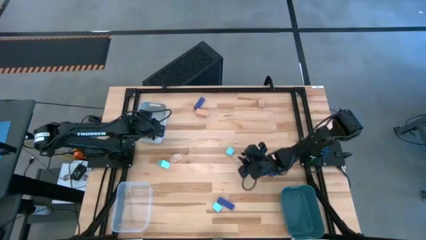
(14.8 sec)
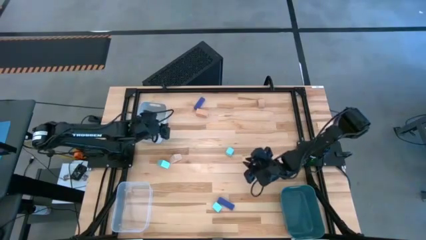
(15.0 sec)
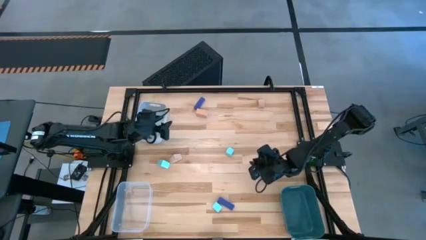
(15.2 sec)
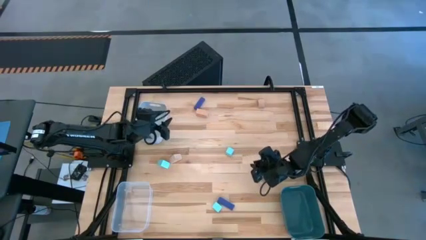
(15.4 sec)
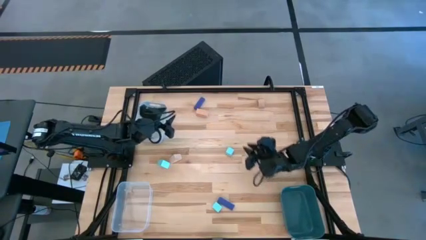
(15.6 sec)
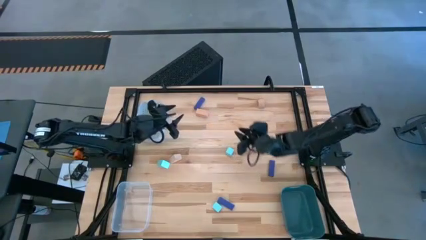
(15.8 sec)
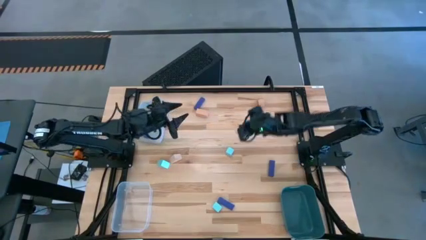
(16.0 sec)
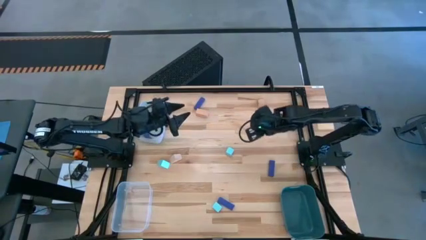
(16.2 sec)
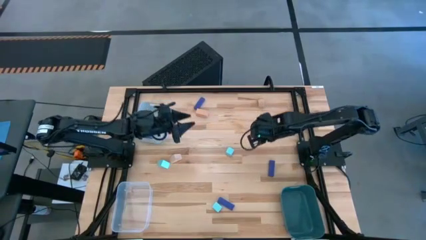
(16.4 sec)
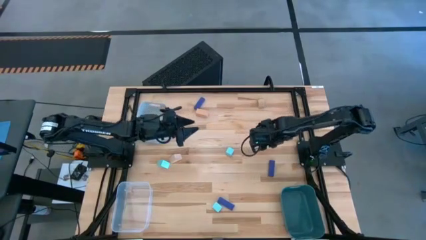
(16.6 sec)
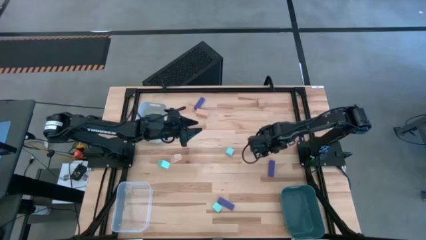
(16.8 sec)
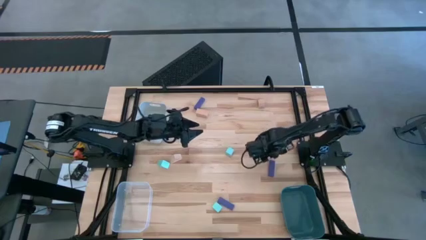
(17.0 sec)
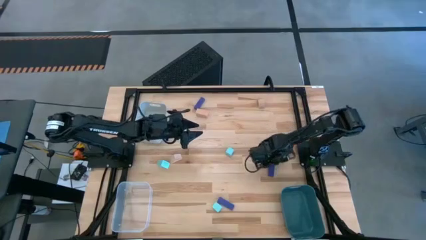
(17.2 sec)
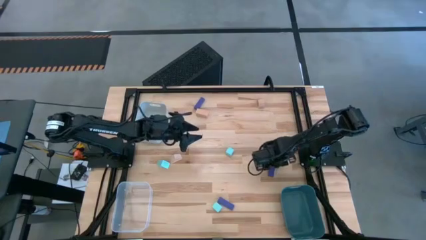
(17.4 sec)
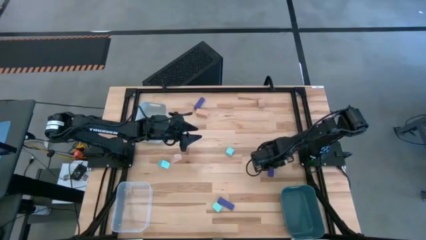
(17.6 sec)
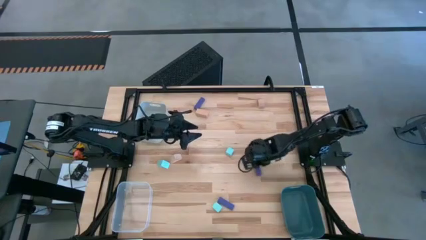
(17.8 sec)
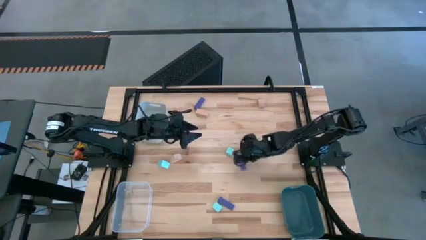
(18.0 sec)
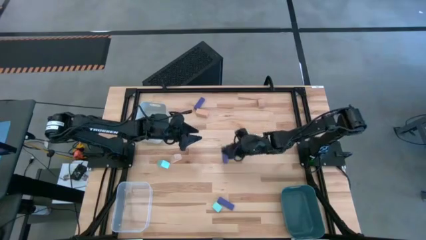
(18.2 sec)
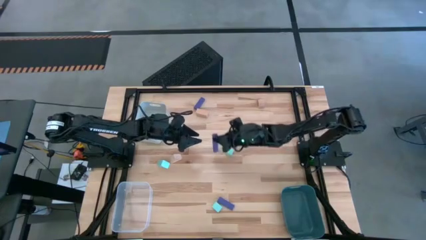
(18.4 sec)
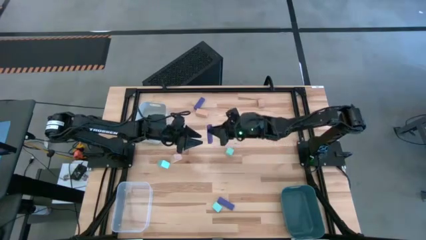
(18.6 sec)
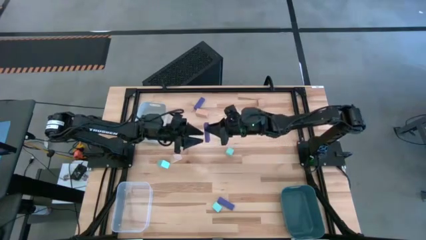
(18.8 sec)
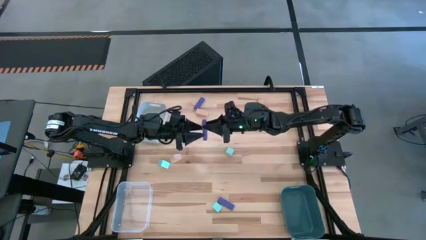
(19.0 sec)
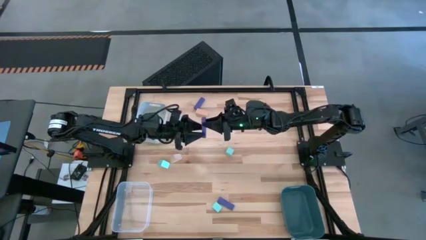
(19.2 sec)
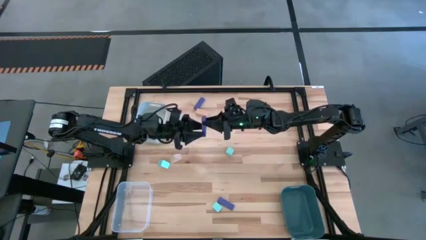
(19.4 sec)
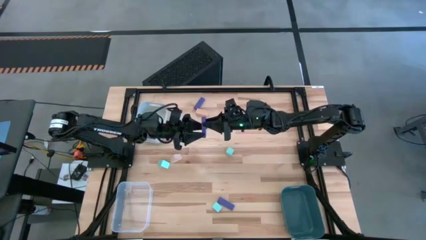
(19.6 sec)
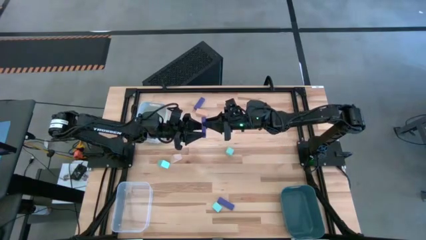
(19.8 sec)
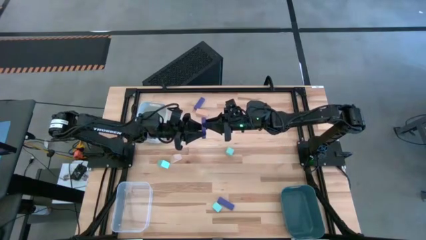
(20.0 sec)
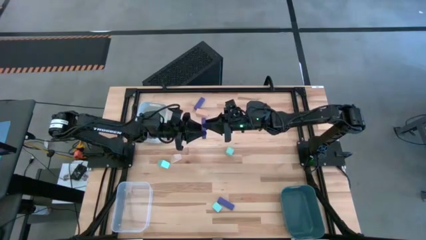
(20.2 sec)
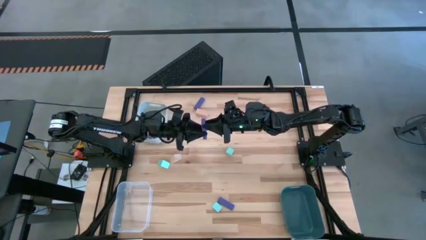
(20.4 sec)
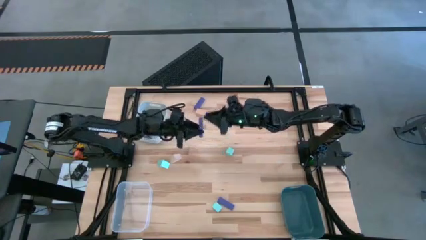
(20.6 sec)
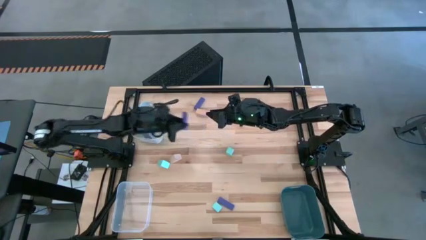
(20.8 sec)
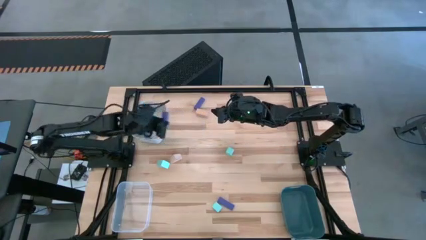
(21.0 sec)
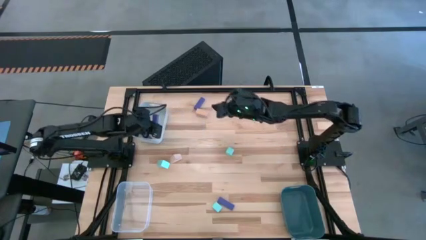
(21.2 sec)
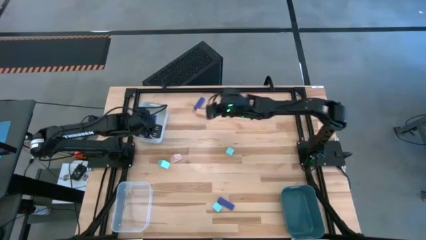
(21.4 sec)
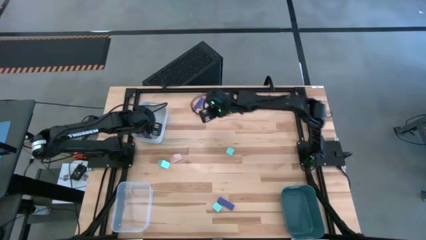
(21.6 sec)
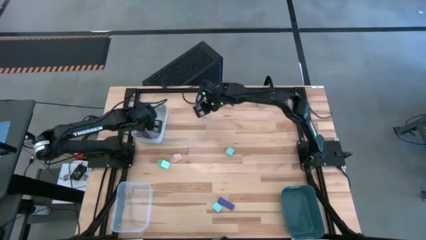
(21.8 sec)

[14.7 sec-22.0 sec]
Task: Sort & place blocks by color
Put the purple block into the gray bin

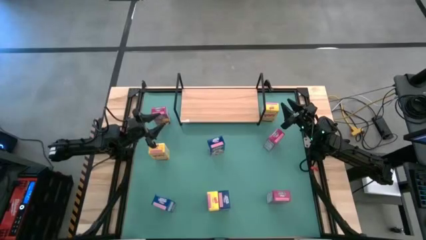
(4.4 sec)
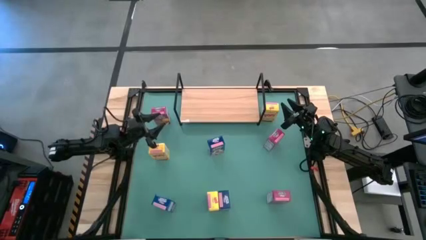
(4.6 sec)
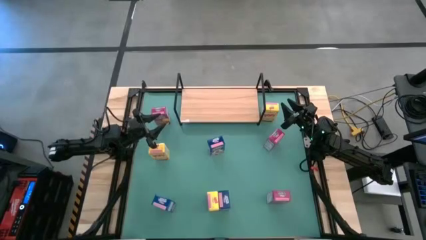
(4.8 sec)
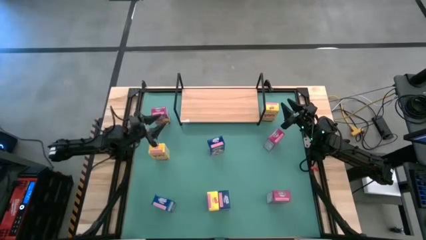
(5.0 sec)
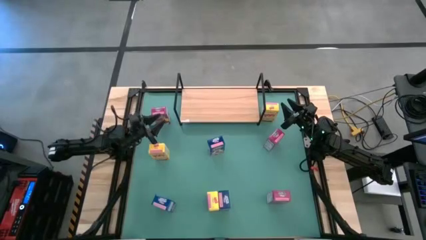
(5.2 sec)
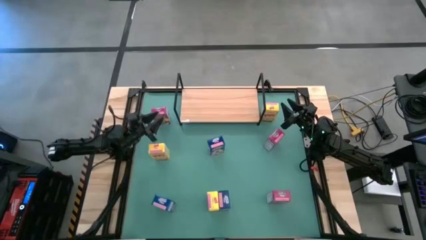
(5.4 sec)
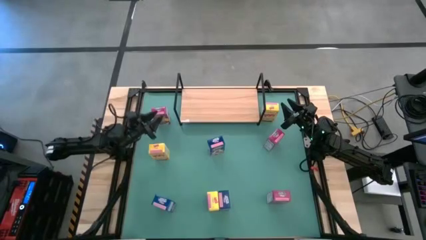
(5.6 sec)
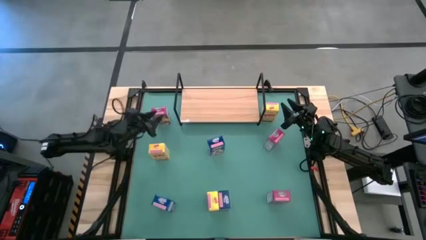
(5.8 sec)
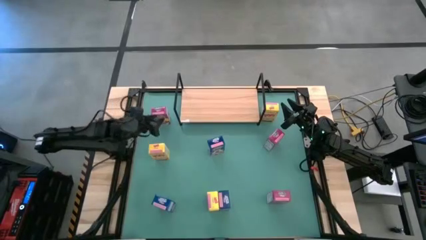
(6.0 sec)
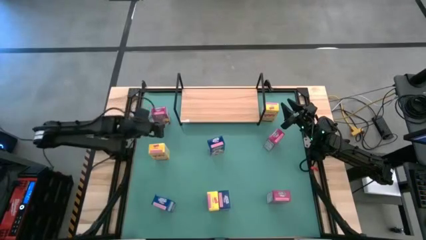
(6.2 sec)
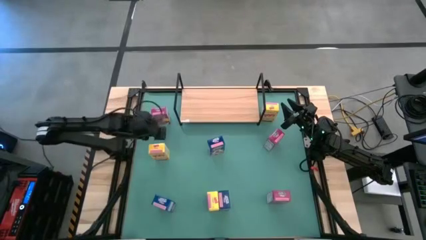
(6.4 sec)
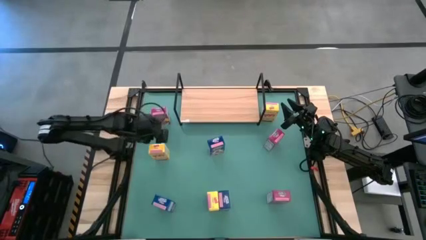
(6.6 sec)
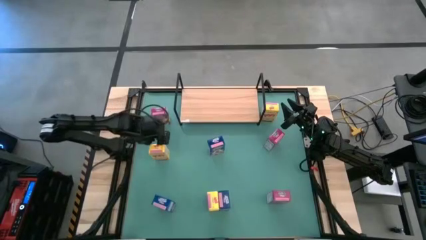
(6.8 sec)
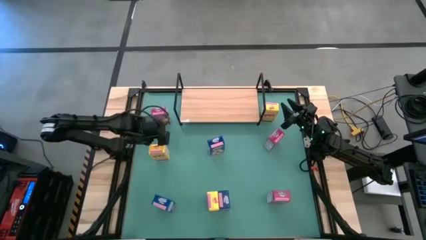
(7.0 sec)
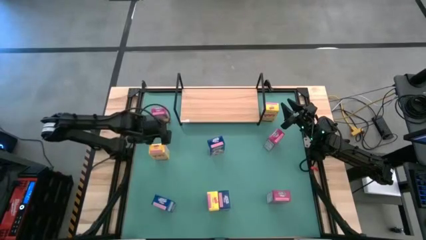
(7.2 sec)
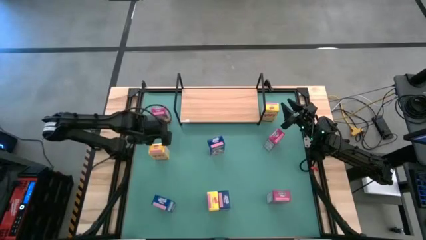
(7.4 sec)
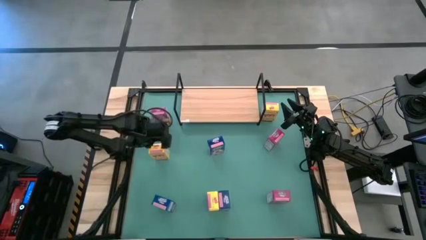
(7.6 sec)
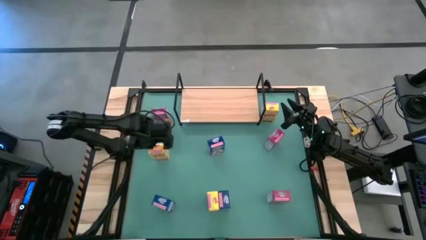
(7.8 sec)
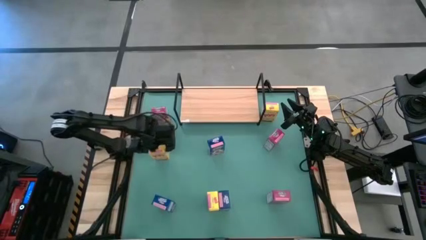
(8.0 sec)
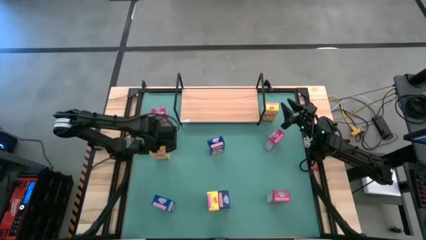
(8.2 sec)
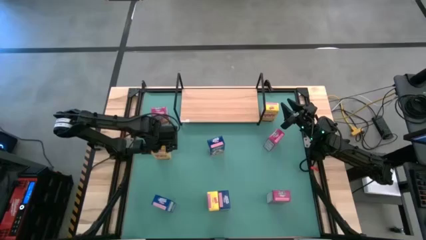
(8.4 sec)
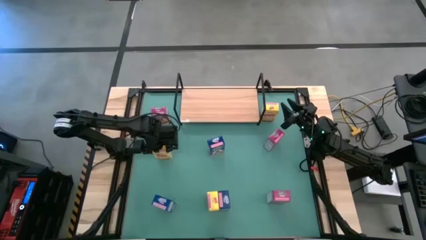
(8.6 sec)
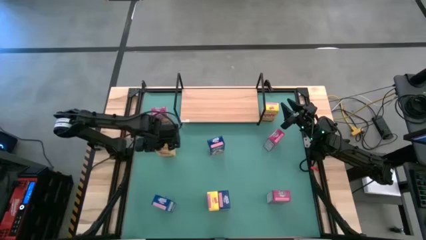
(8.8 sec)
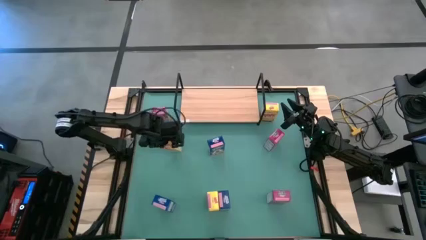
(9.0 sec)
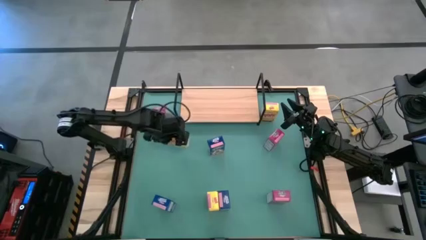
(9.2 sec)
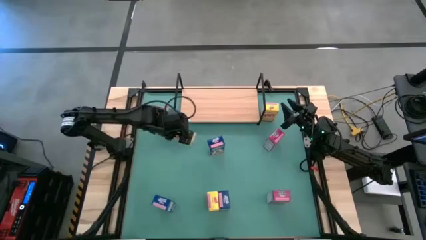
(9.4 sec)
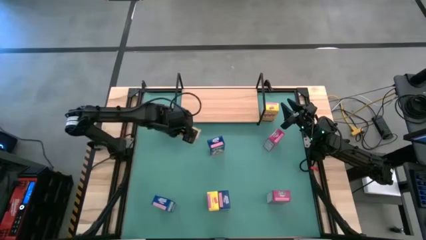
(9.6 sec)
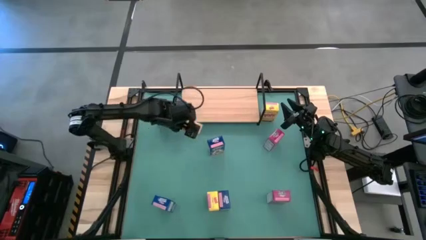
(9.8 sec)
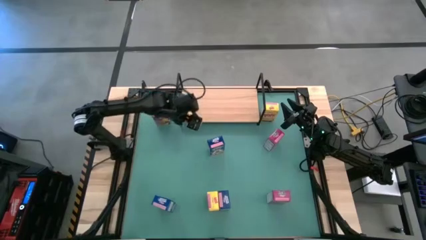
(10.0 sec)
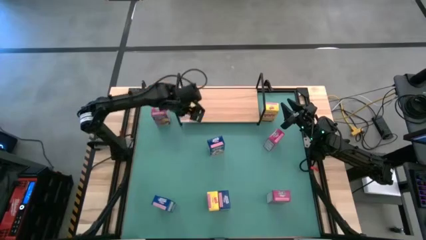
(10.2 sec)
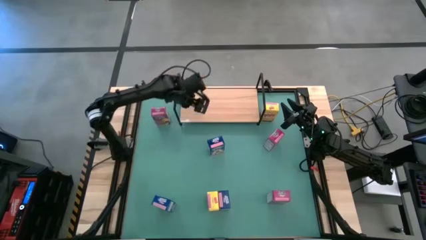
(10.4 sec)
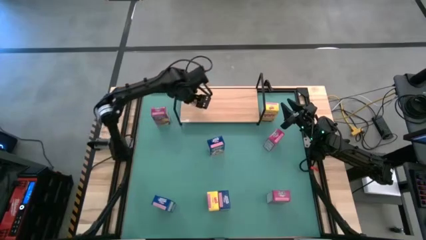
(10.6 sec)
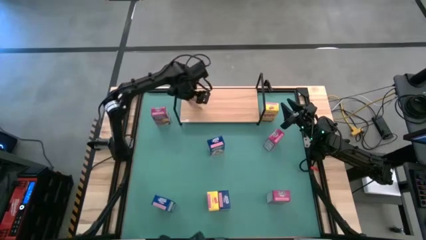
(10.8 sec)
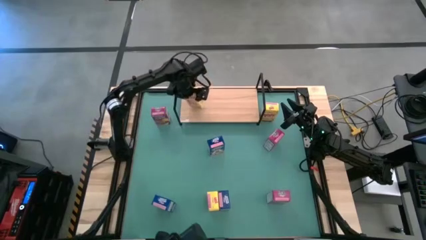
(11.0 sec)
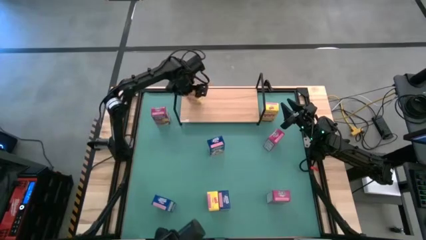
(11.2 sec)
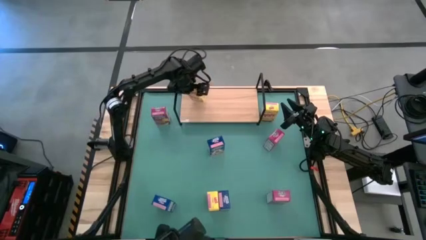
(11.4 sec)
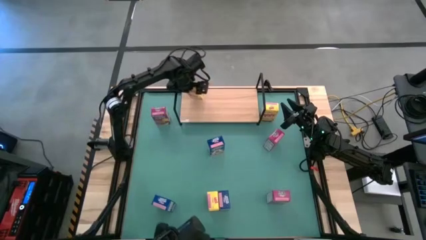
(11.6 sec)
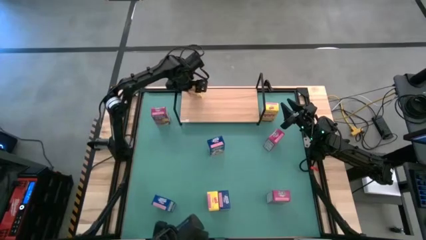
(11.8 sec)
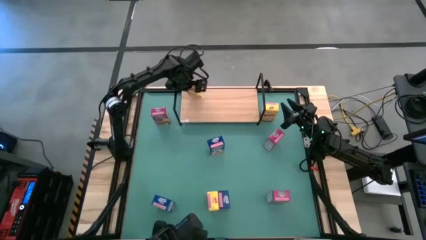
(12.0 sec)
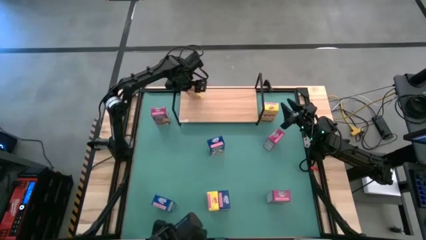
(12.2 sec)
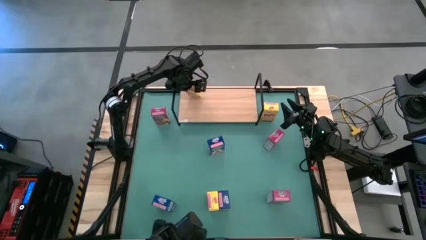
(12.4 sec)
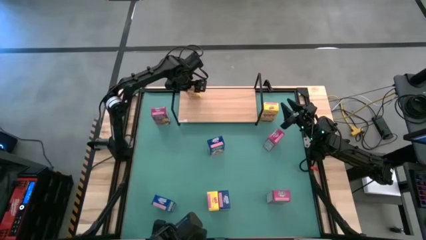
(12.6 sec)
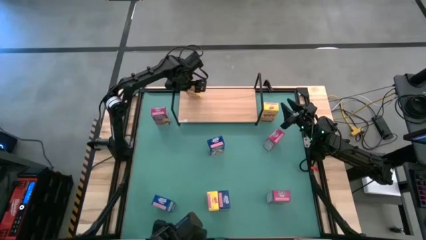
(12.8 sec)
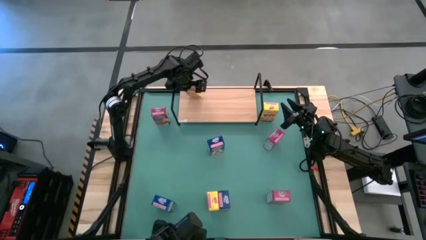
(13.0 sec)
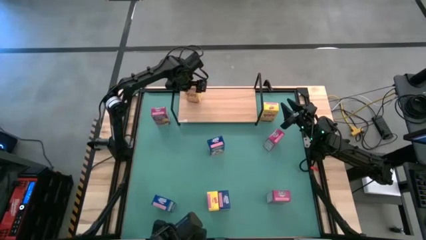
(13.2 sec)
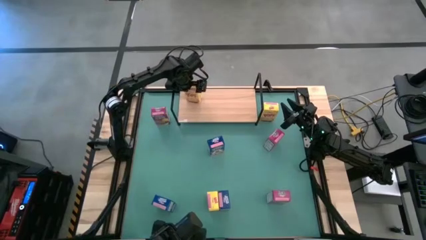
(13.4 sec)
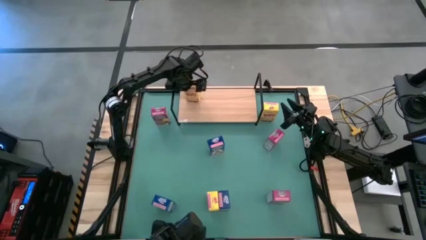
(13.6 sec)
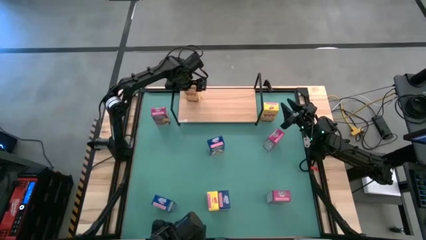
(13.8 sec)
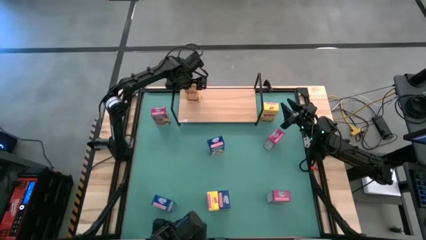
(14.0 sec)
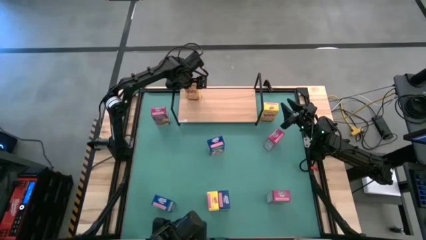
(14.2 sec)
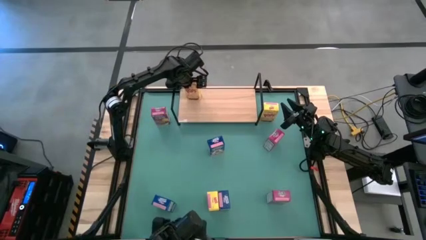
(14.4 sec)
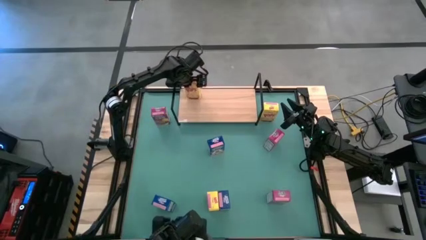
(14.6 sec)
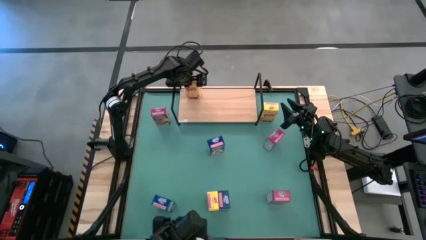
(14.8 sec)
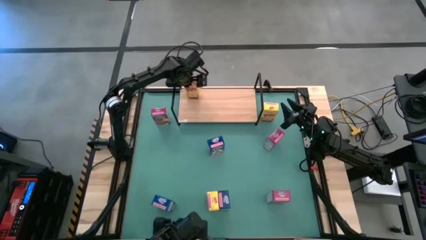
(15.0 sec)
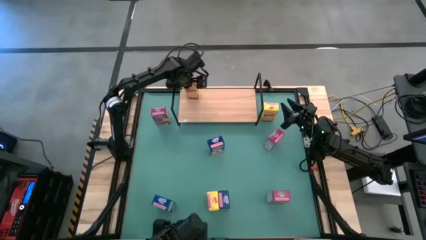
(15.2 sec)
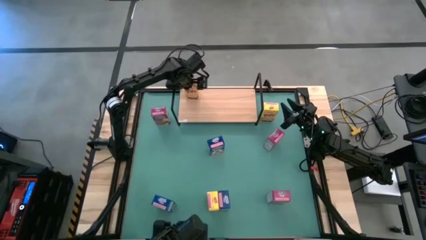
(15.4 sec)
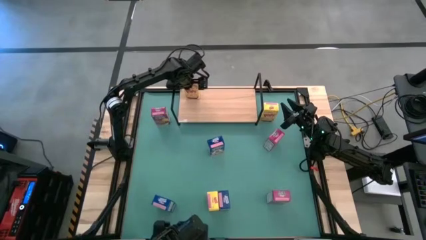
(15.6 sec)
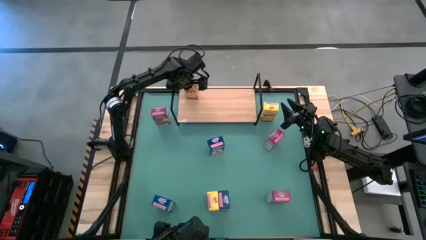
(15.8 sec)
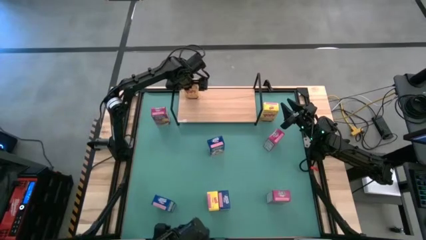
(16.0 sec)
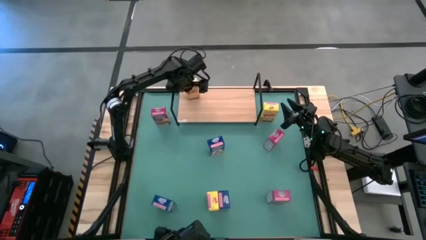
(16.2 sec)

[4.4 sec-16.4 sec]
Task: Stack cereal on shelf
Put the middle yellow cereal box on the shelf
